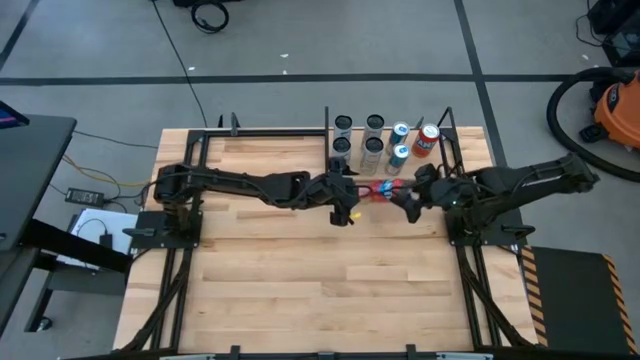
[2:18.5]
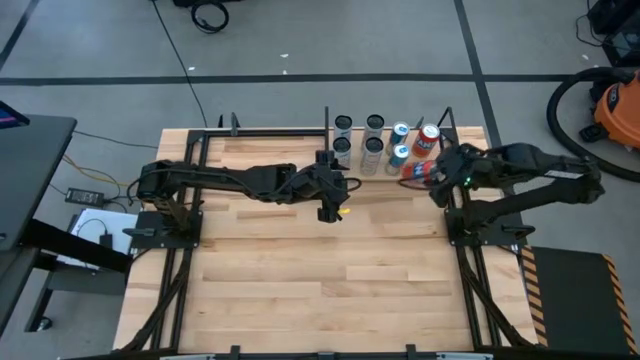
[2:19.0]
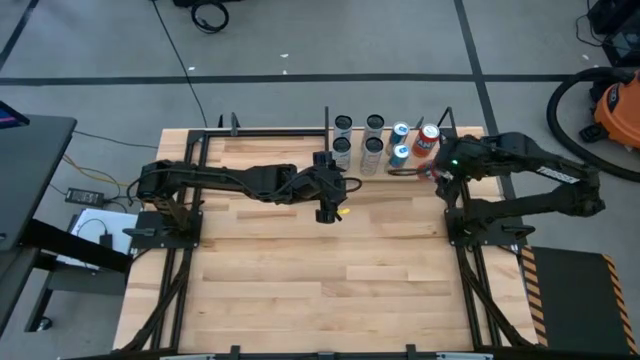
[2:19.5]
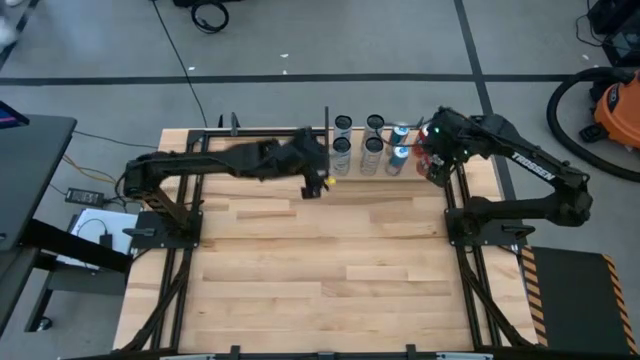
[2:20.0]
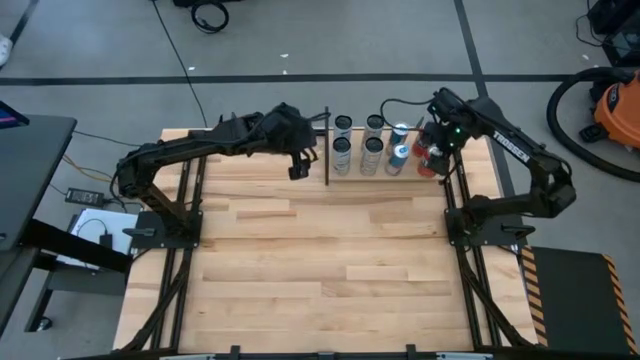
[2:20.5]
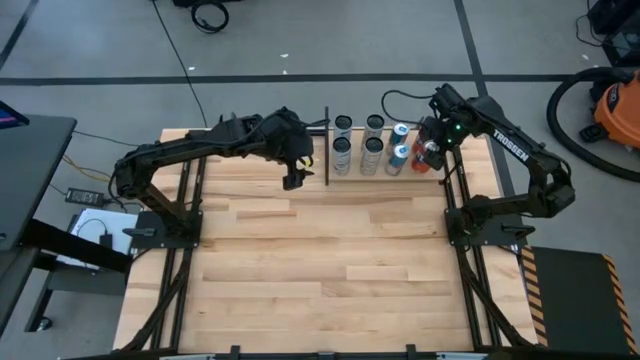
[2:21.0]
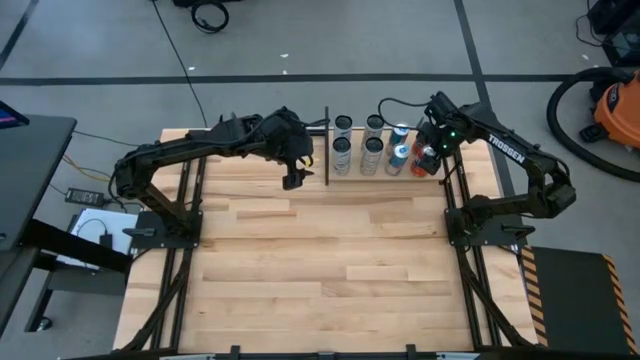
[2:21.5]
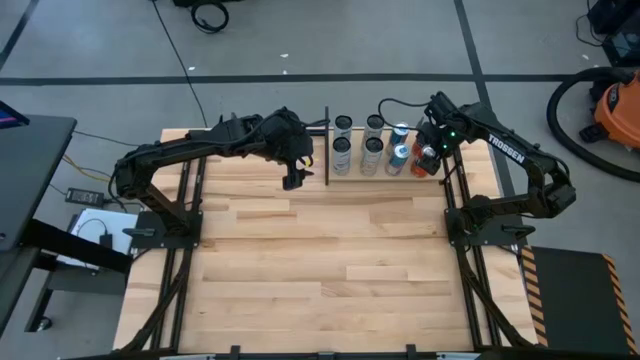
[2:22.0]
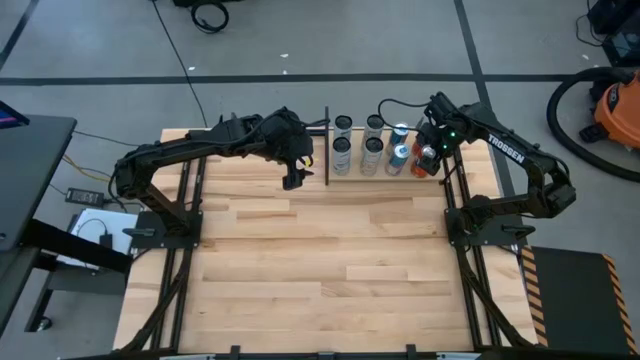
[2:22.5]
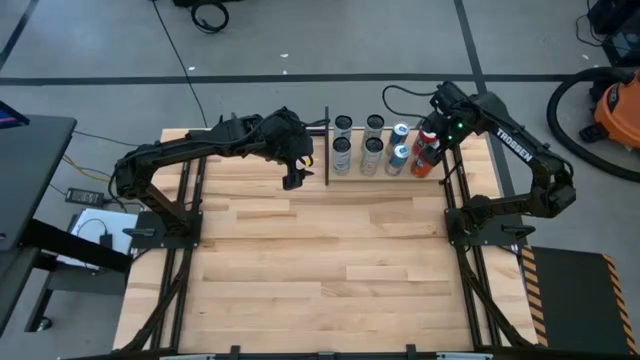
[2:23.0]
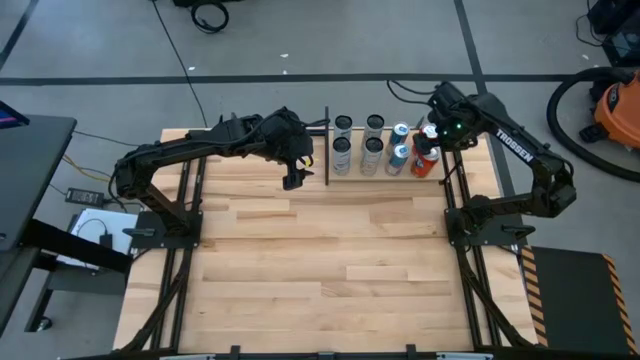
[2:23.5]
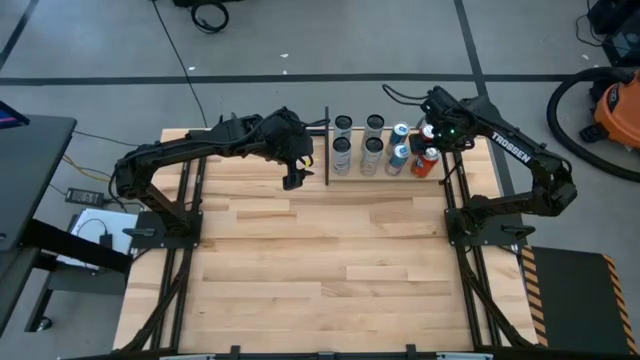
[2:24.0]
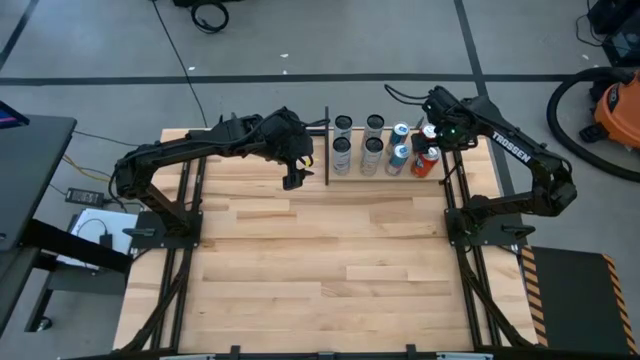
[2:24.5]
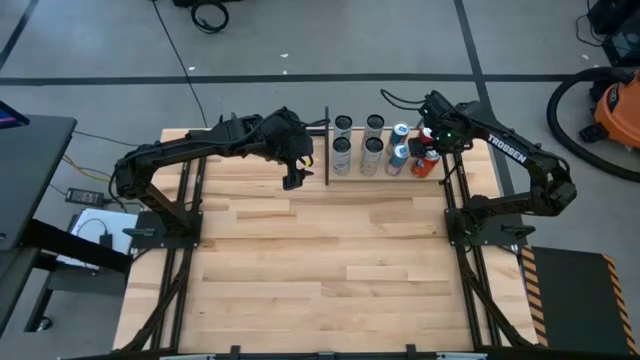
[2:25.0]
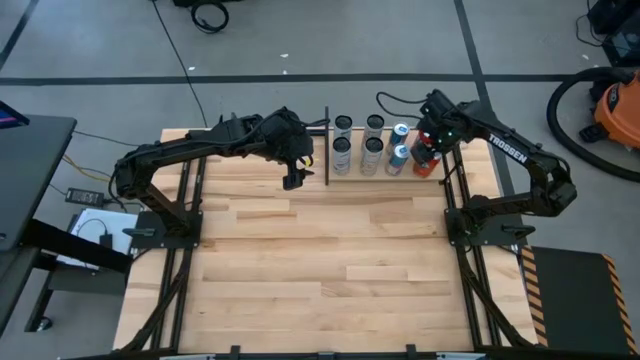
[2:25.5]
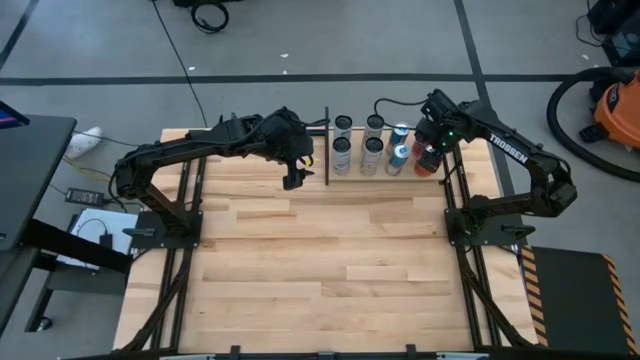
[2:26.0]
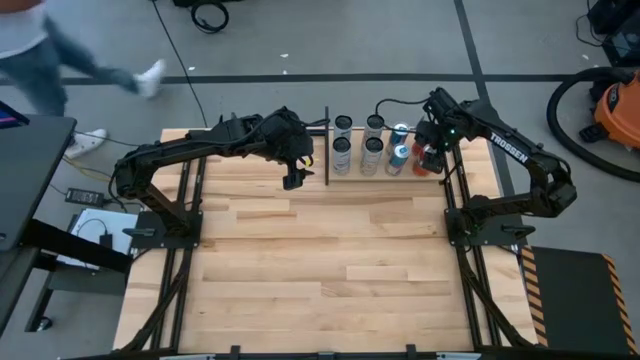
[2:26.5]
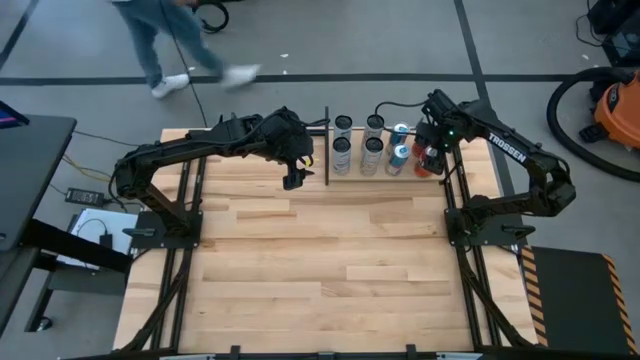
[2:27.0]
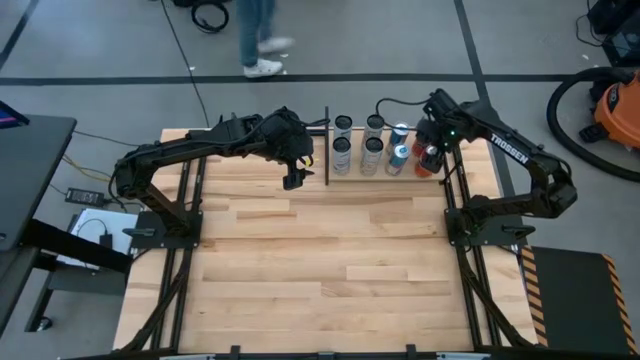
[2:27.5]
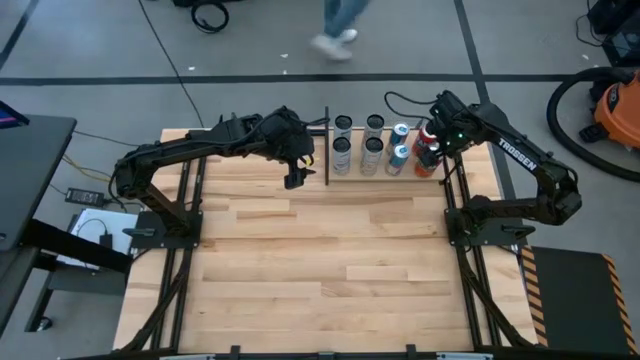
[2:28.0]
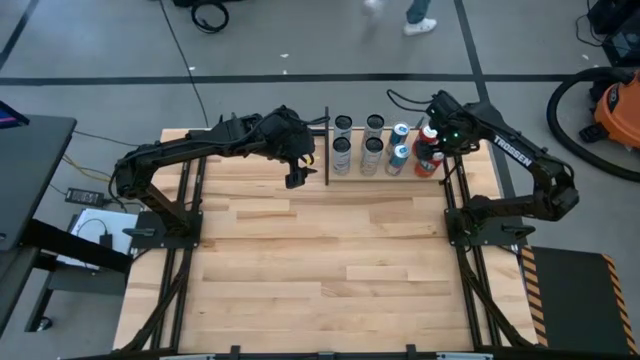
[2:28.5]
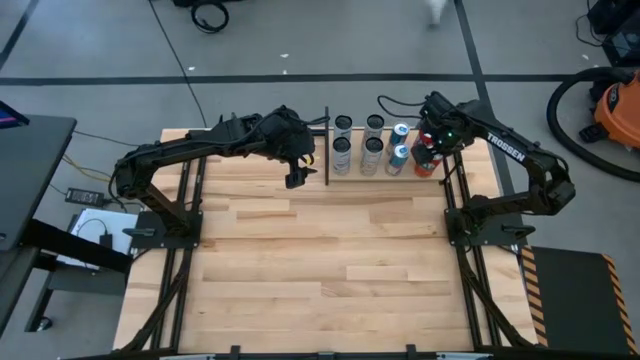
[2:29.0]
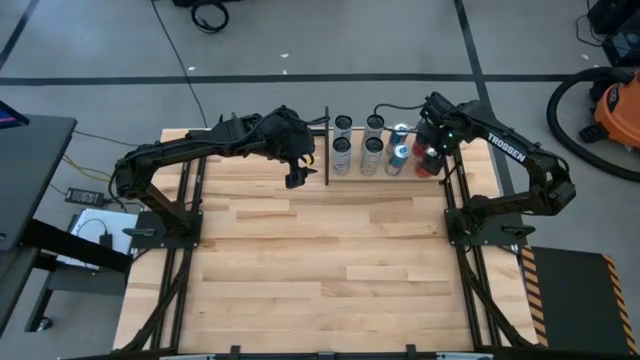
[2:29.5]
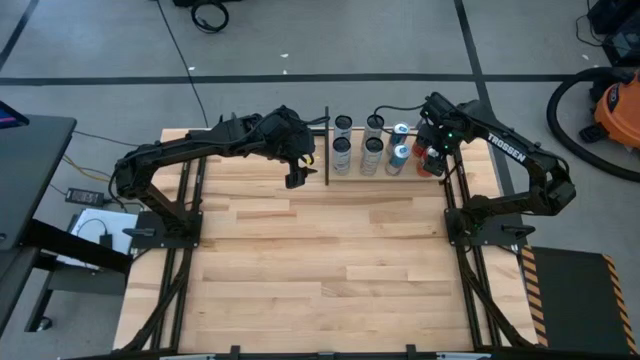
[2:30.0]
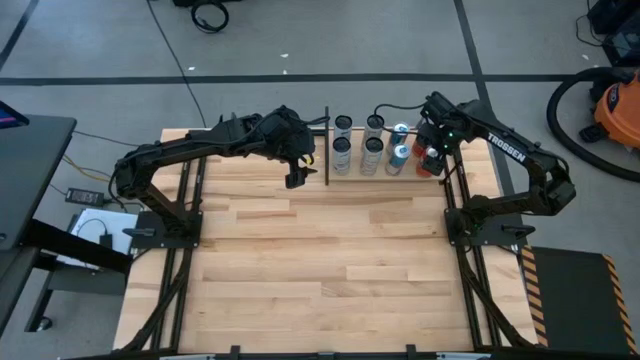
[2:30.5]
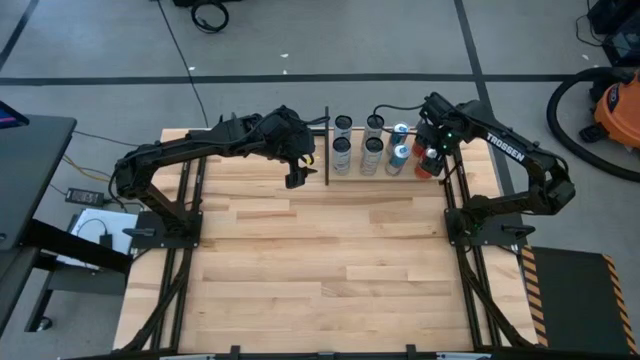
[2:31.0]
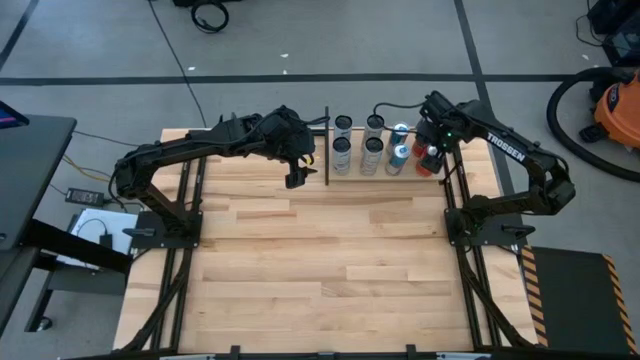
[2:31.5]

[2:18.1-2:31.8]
Task: Place canned beverage on shelf
Put the red soda can on the shelf aligned with the other orange soda can

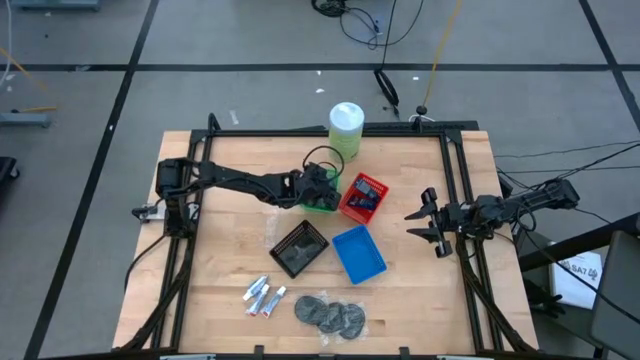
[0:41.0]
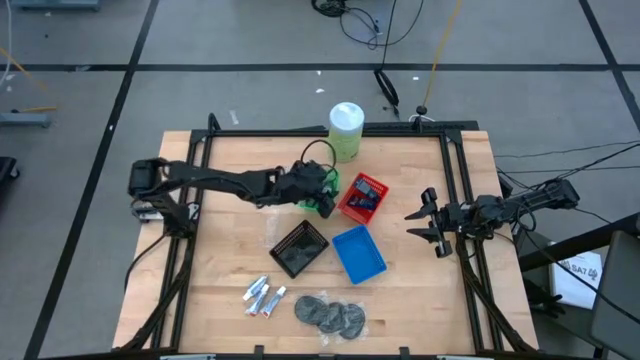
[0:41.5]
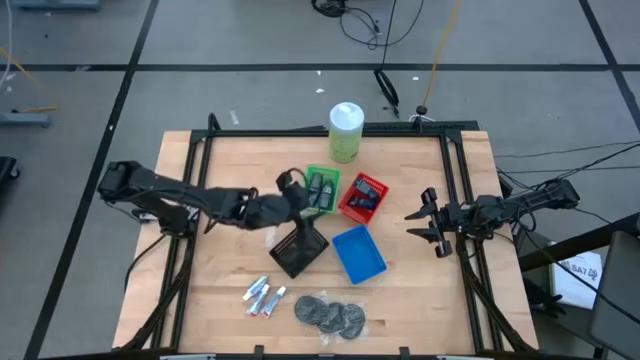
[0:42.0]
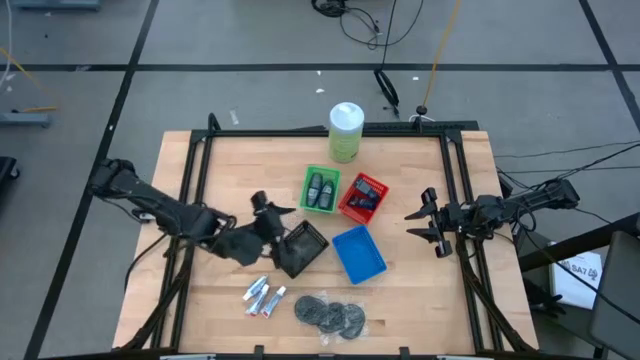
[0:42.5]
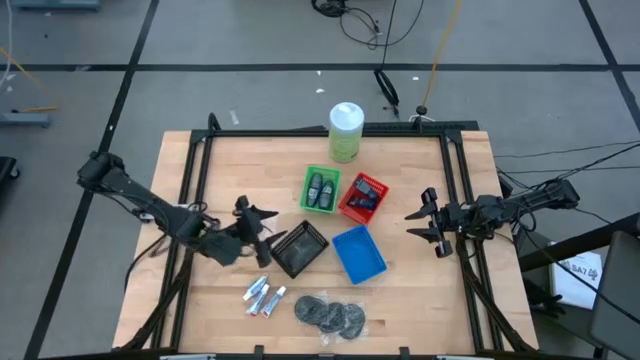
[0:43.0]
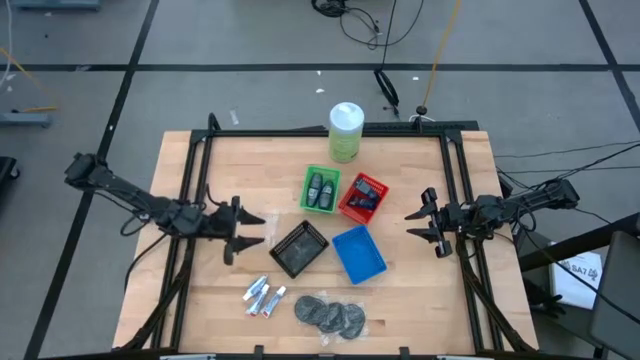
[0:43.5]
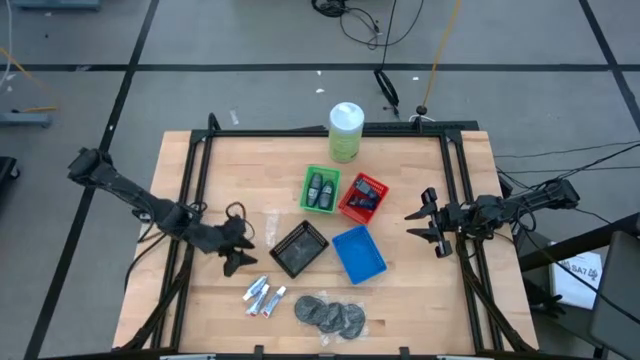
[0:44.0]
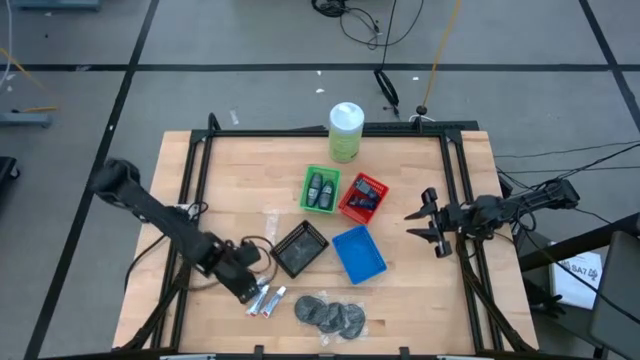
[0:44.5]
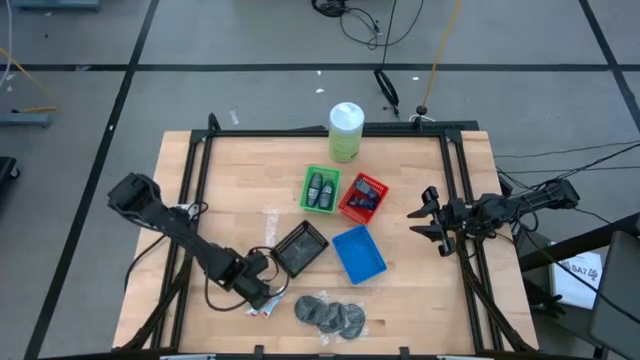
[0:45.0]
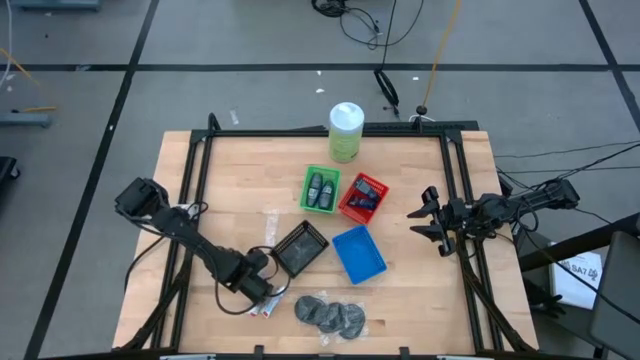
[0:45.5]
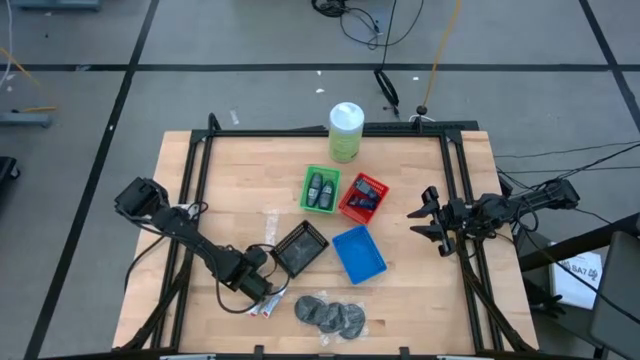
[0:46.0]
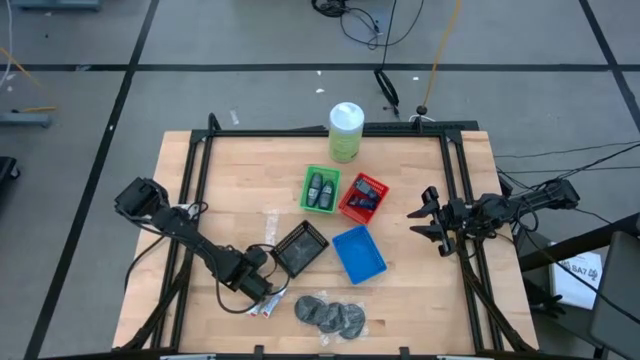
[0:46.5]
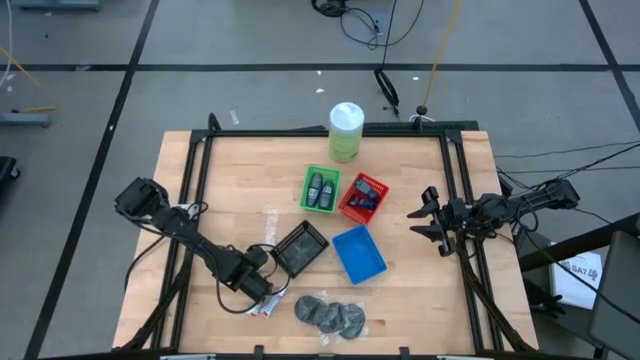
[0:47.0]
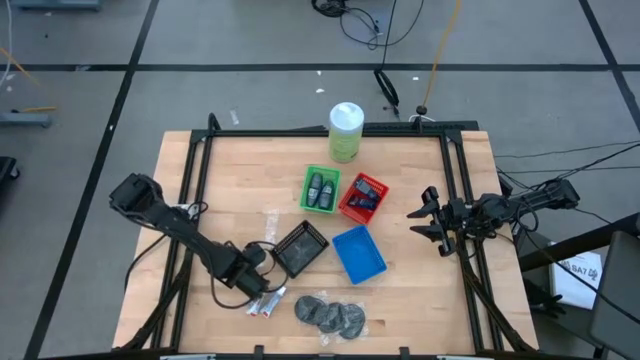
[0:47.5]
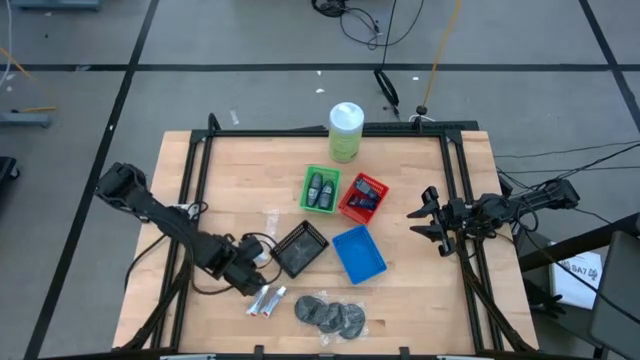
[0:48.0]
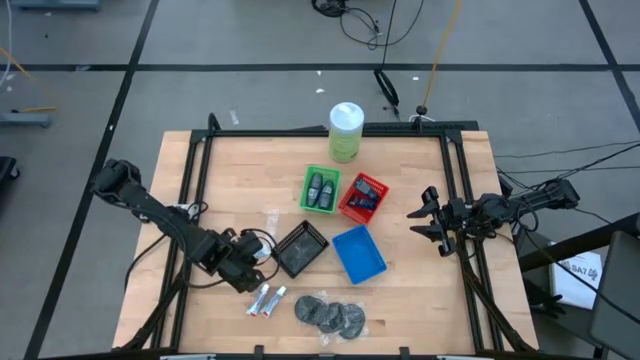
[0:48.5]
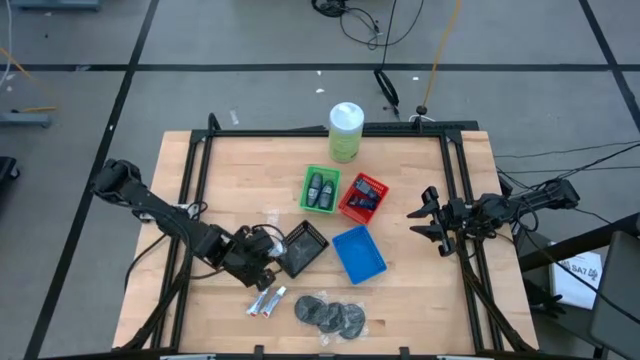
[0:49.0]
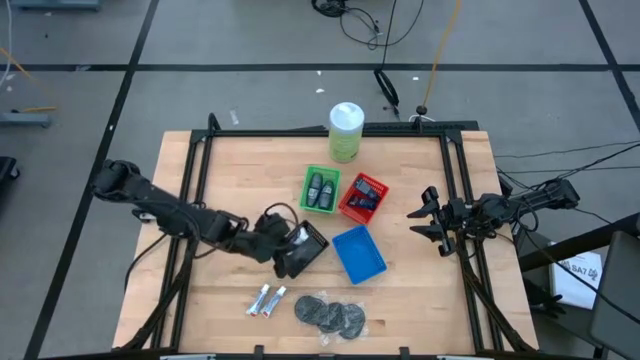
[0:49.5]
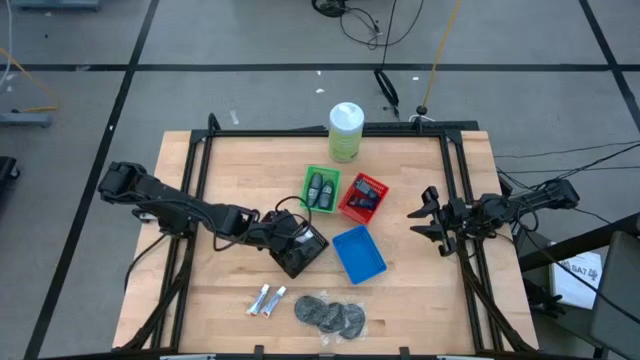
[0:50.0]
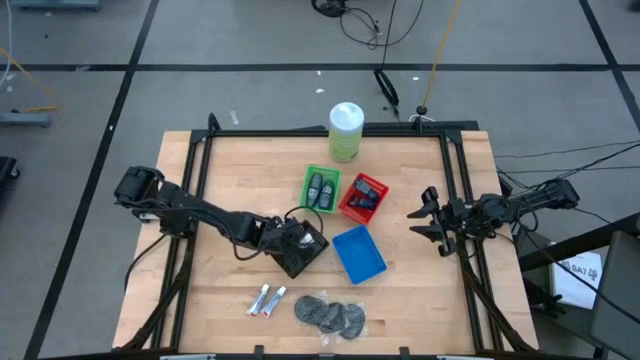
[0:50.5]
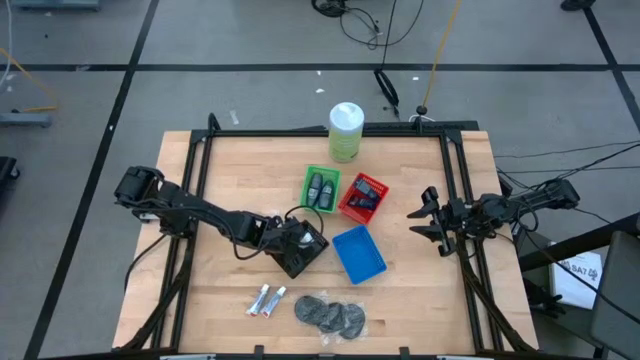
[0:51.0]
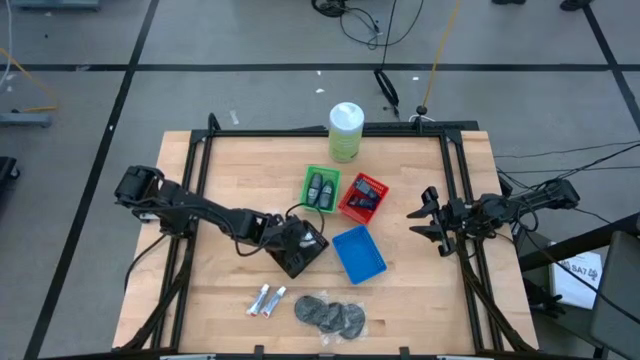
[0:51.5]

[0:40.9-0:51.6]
Task: Pick & Place Travel size toiletries
Put the top left white toothpaste into the black bin
